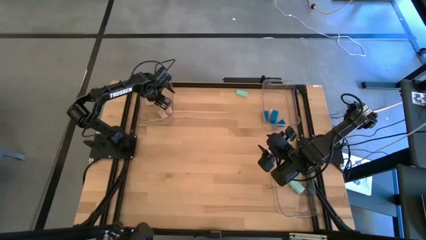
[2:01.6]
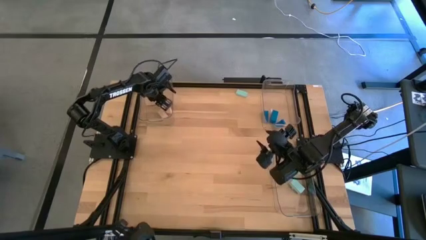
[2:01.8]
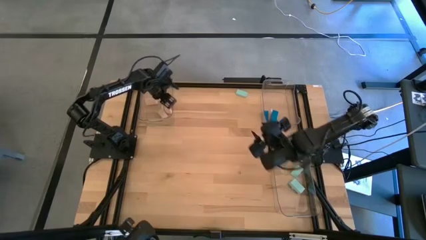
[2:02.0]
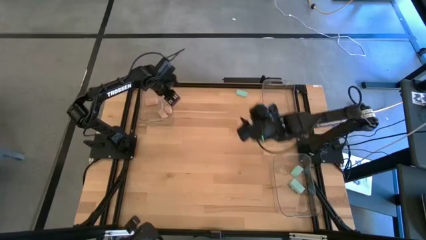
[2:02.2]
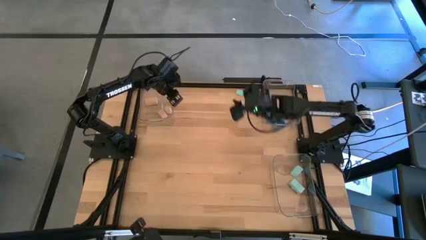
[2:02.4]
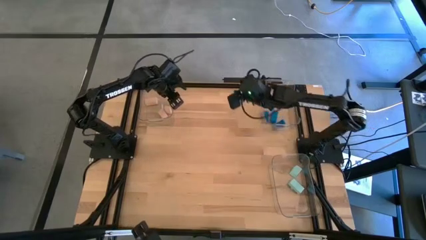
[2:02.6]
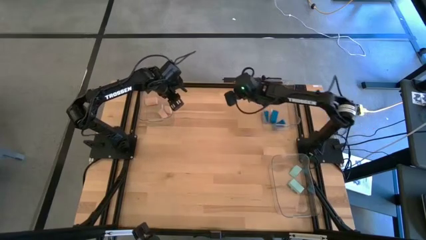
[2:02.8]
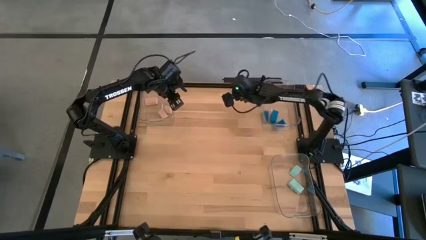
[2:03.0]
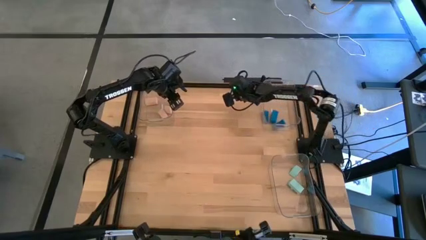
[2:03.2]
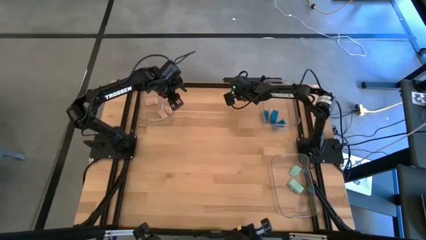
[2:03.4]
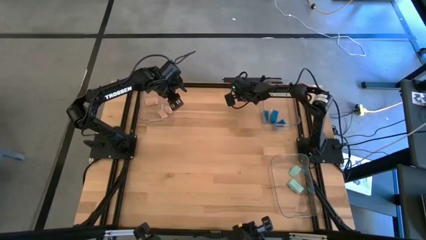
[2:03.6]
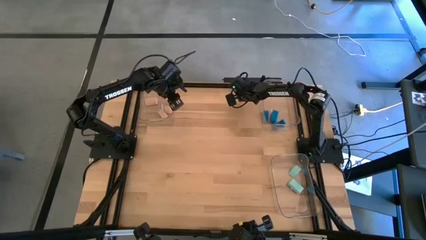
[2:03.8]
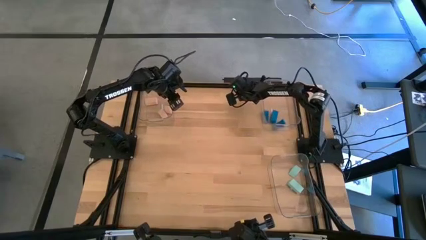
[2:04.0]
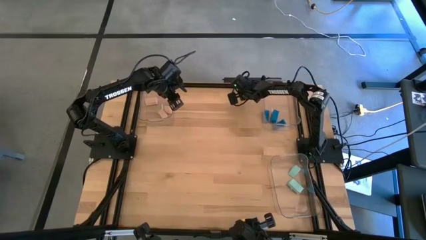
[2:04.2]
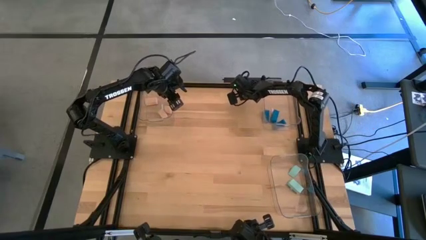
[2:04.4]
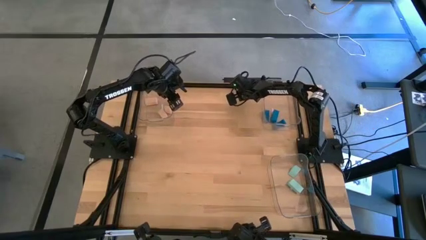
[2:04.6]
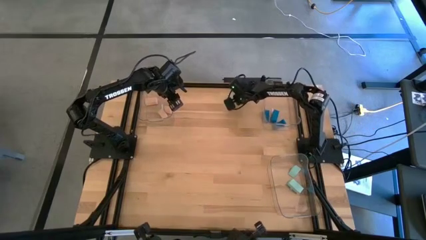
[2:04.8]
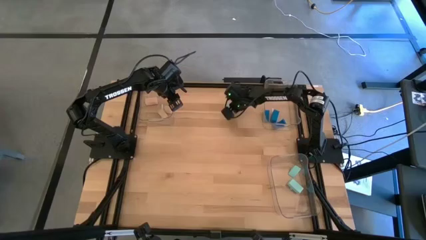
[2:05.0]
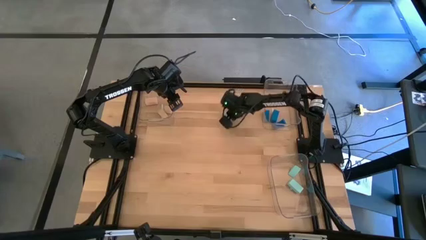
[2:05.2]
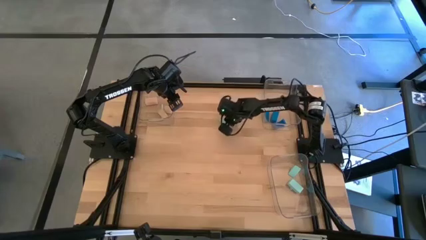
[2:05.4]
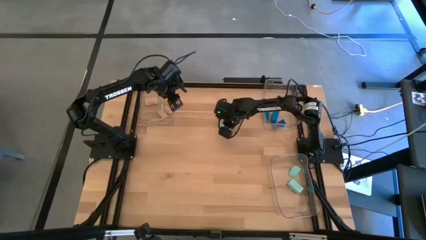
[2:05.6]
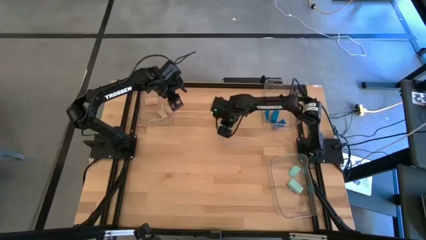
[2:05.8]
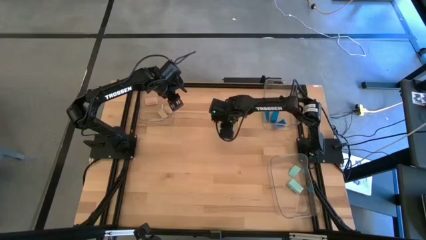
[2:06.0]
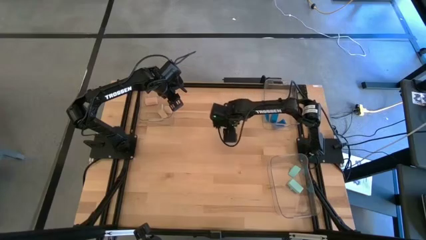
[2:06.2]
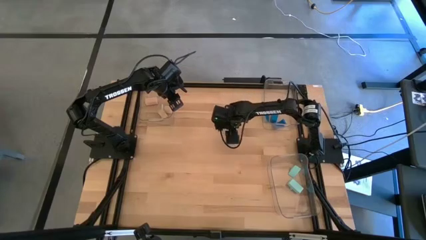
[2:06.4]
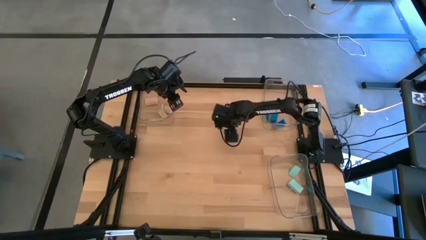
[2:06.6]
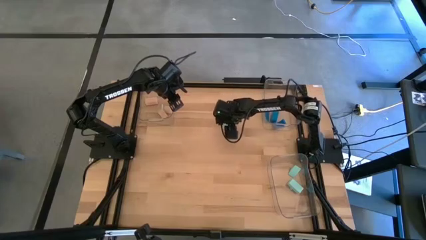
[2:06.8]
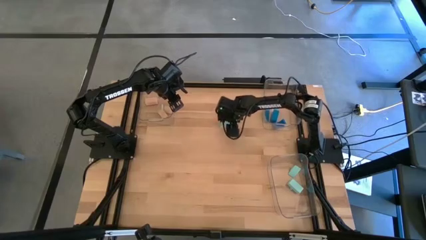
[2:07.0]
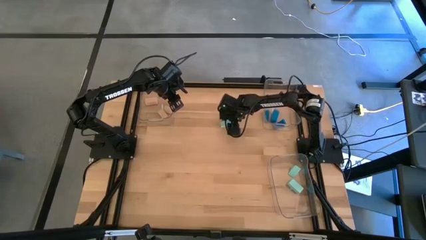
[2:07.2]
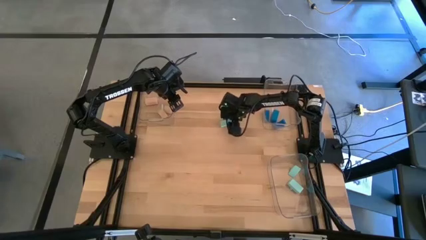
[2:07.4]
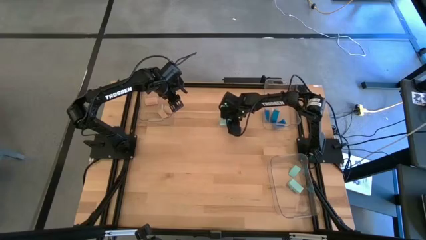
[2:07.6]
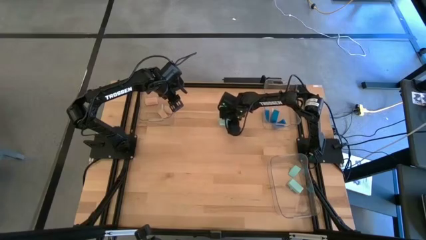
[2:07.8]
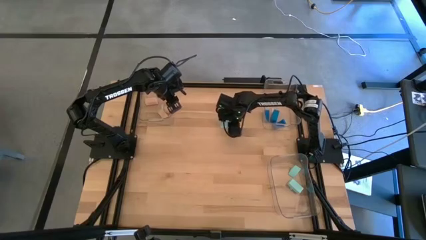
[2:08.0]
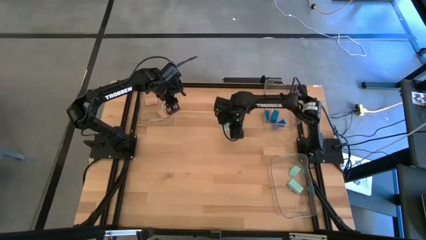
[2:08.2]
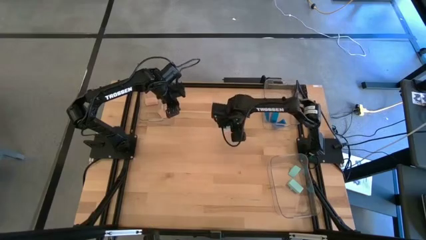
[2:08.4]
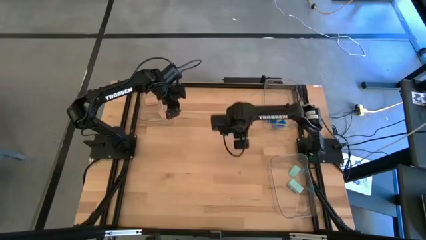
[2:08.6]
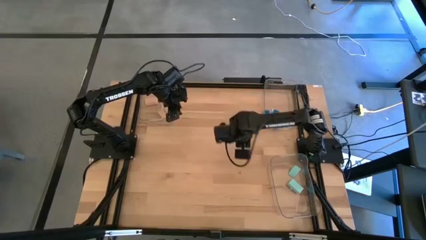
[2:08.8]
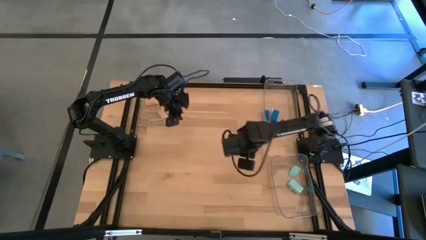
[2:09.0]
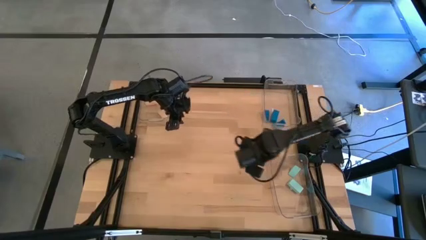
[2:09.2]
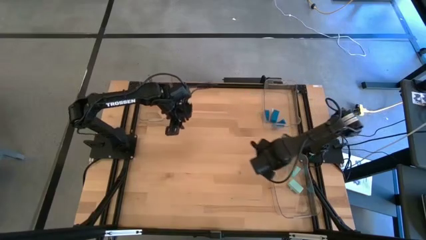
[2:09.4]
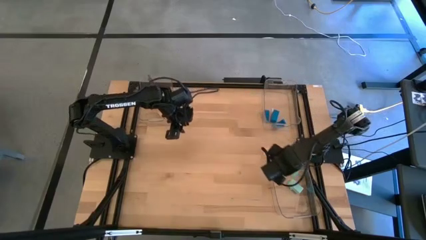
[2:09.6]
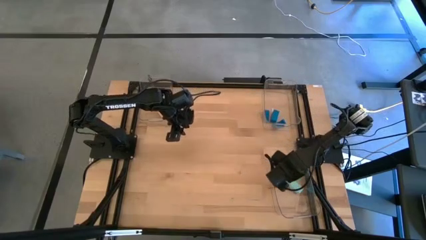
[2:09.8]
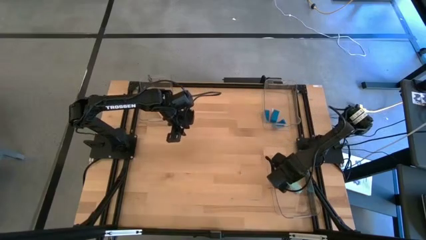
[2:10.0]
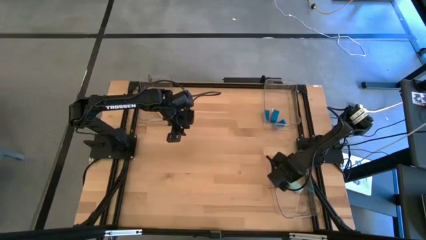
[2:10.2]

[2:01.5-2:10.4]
Task: Sort & place blocks by color
Put the light blue block into the bottom right transparent bin

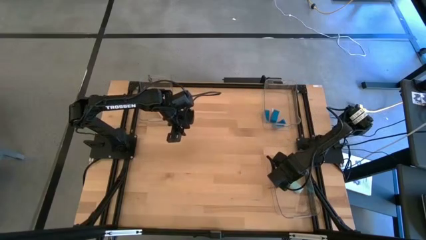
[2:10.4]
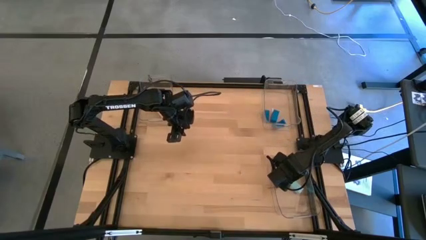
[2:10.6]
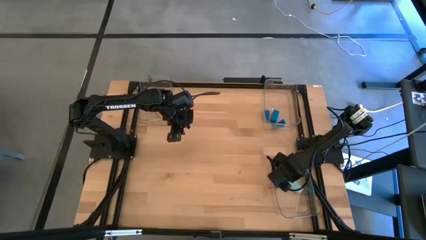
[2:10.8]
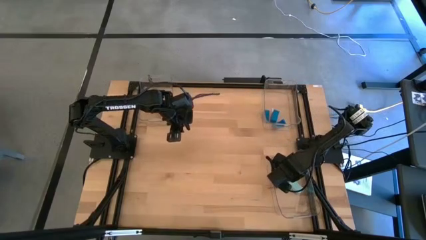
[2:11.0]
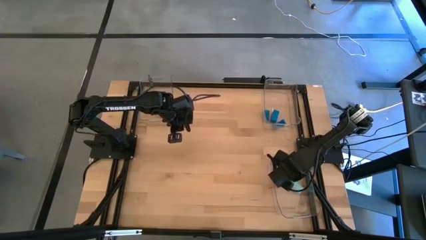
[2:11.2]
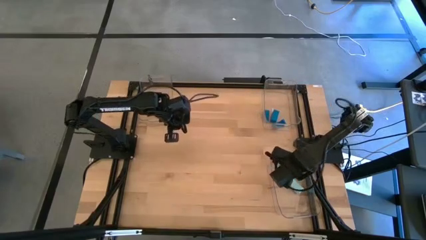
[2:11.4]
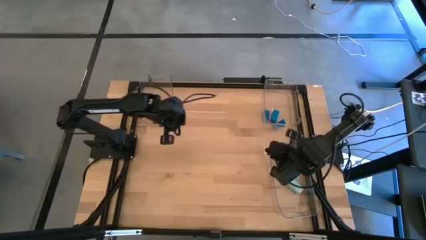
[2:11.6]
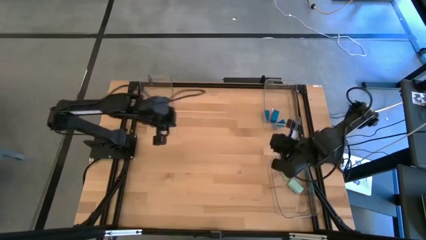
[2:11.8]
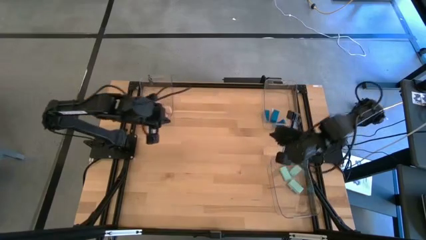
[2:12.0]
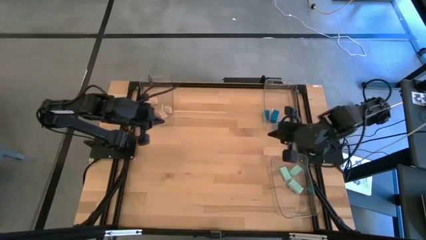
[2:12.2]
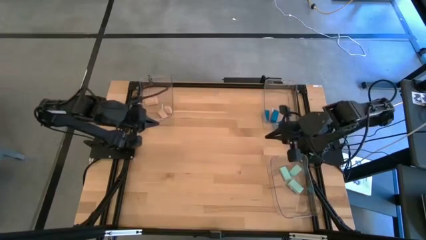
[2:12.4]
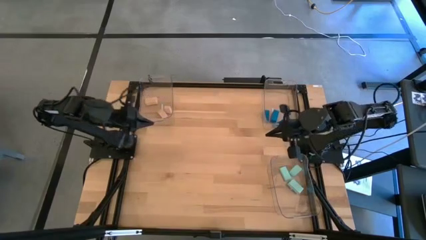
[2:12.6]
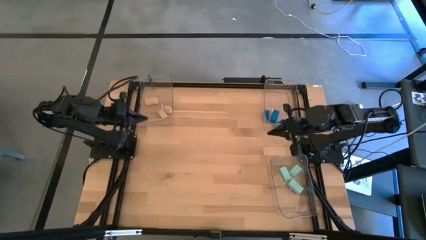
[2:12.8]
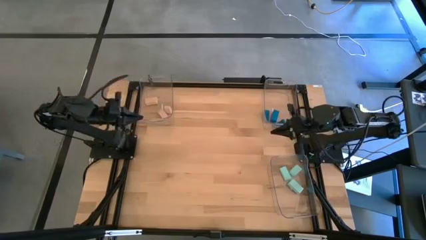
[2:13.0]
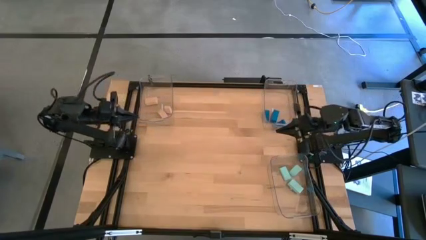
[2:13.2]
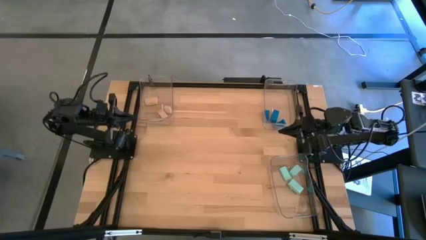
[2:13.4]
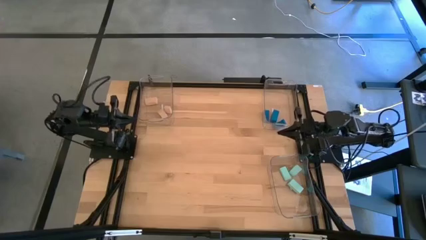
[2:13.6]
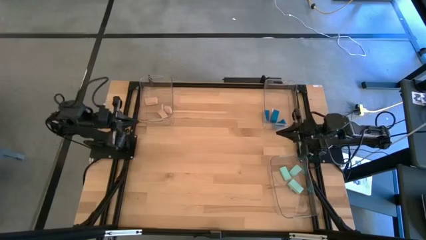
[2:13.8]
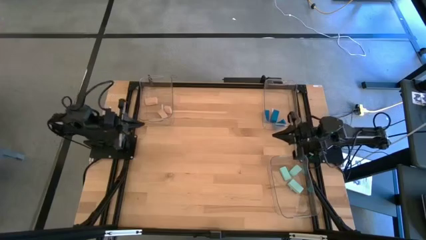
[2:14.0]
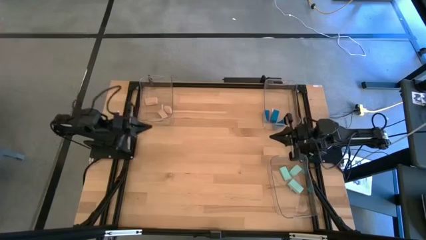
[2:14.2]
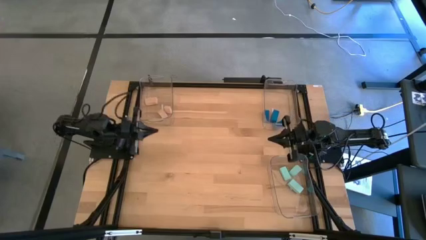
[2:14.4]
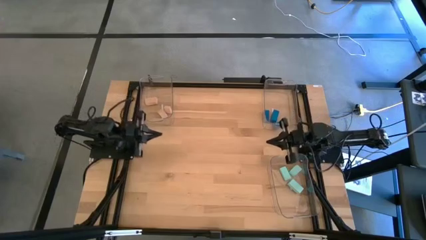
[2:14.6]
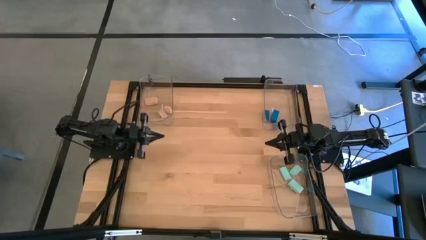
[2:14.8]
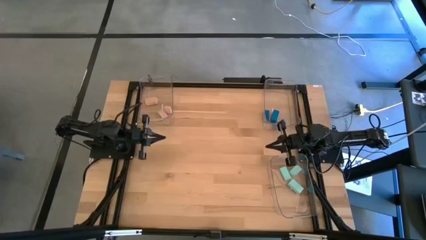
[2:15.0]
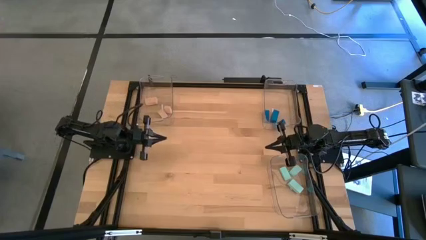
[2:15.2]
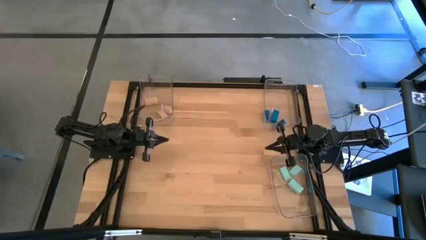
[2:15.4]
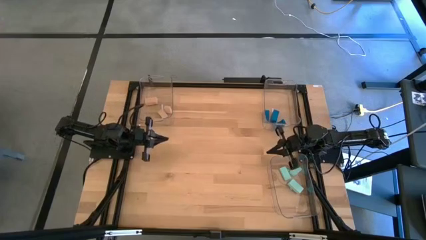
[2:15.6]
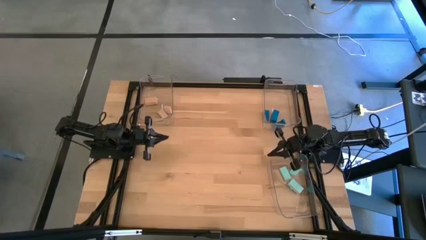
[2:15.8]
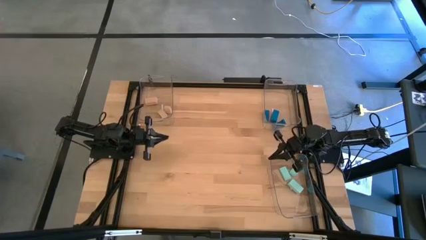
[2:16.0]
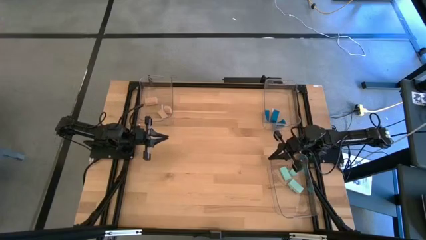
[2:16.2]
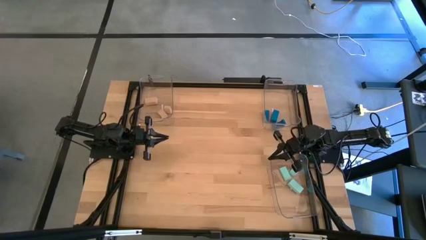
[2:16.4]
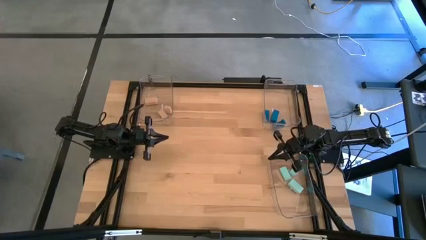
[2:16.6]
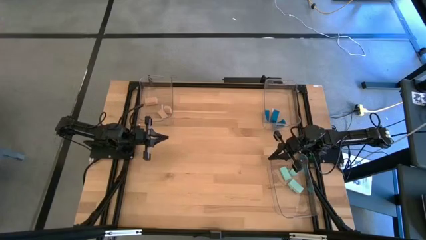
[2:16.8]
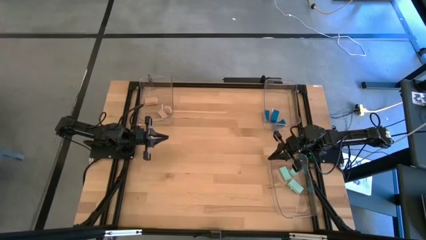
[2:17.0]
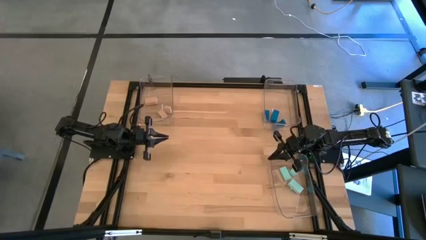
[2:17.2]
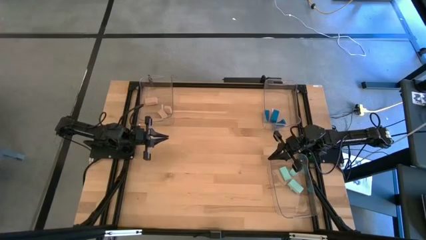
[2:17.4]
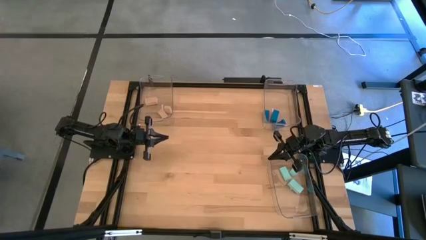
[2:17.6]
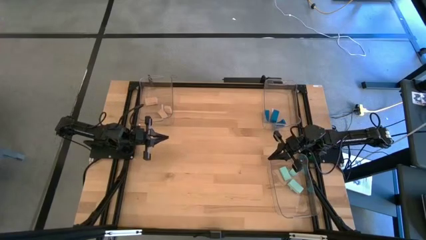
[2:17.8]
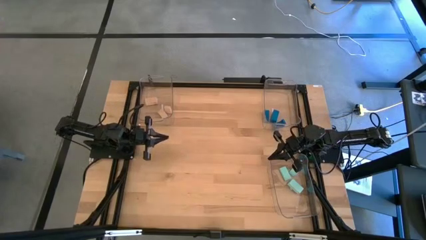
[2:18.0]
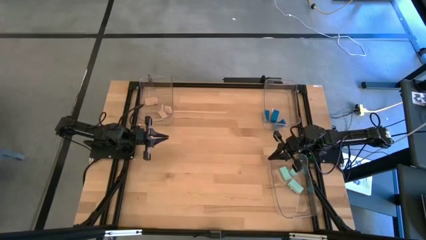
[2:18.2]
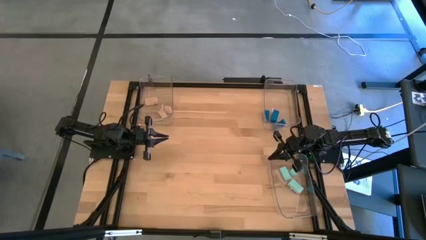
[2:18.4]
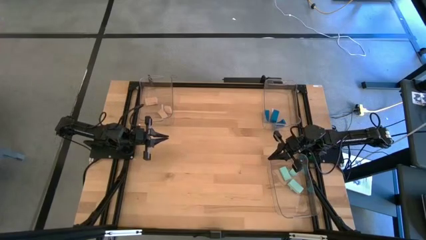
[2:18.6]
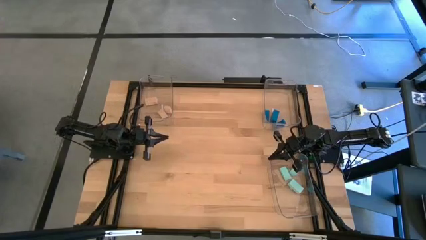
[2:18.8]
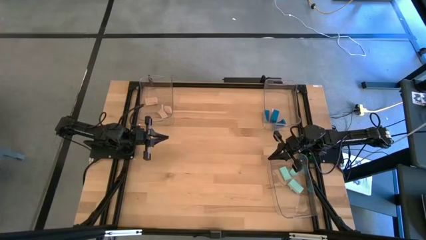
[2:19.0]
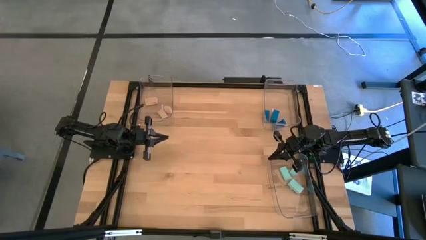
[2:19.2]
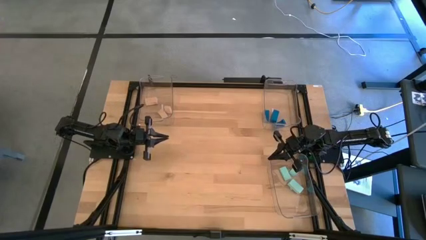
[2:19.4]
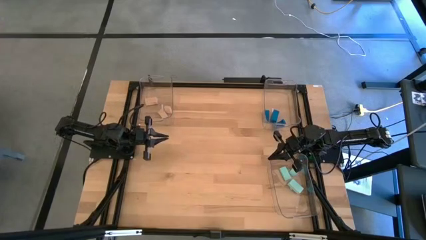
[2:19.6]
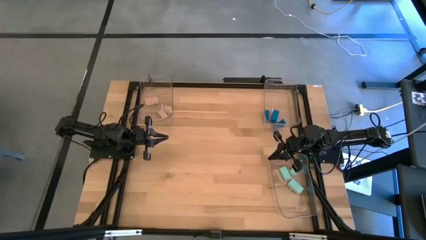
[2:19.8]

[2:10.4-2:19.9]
Return to Home Position
